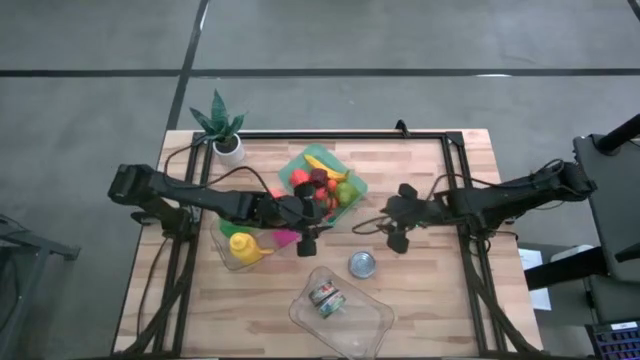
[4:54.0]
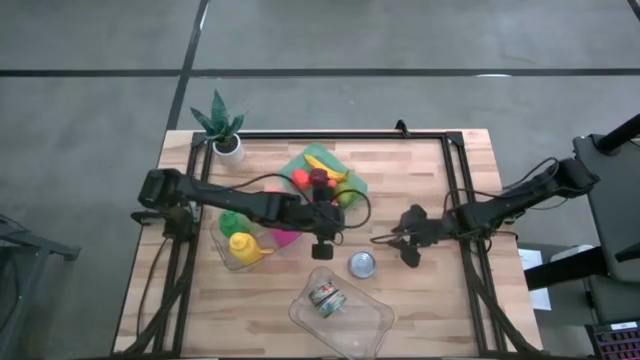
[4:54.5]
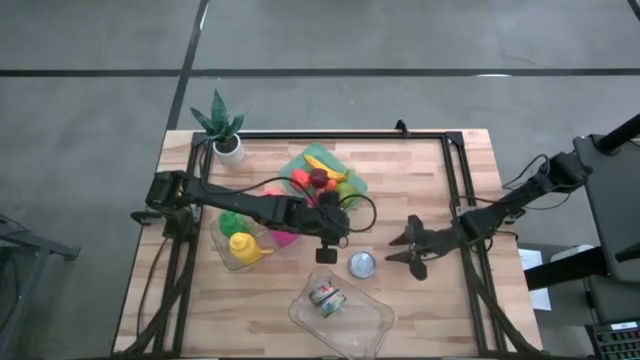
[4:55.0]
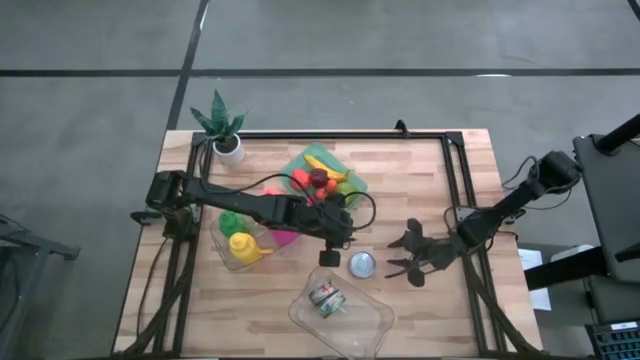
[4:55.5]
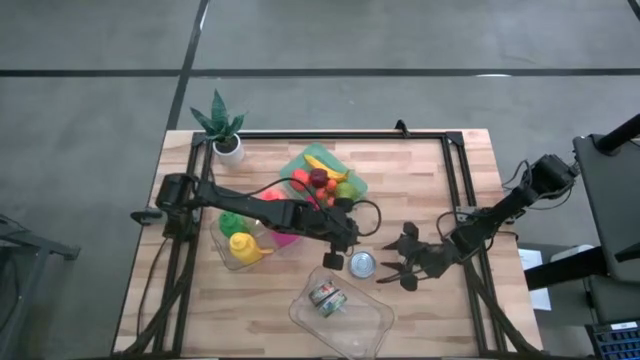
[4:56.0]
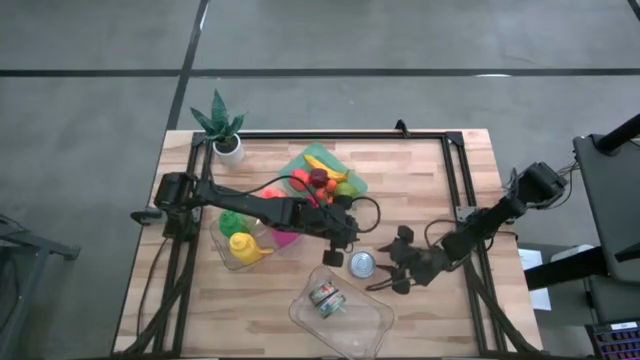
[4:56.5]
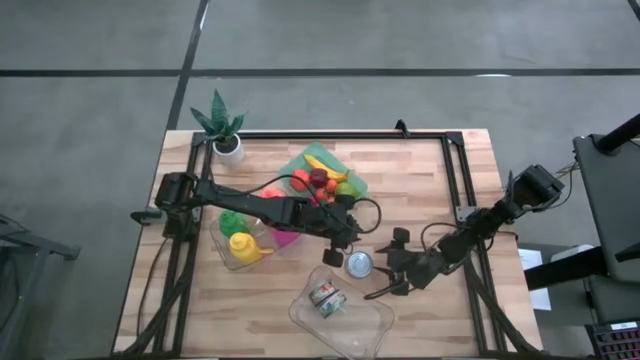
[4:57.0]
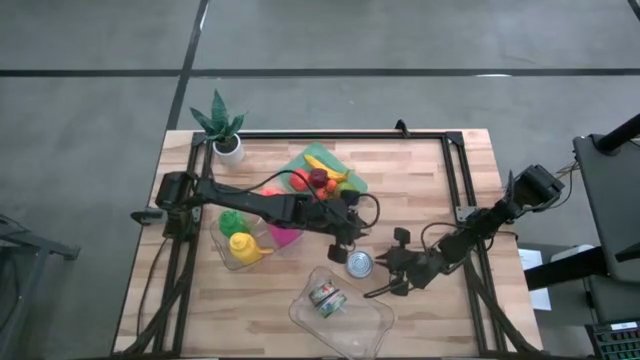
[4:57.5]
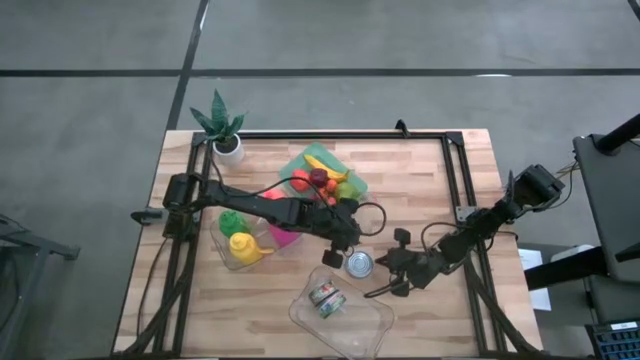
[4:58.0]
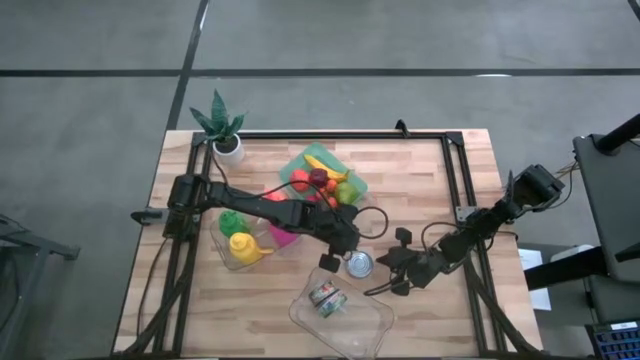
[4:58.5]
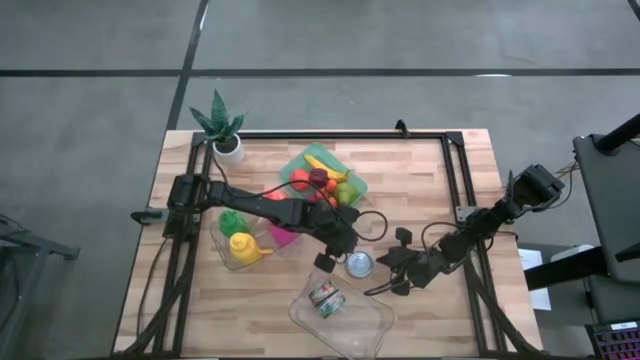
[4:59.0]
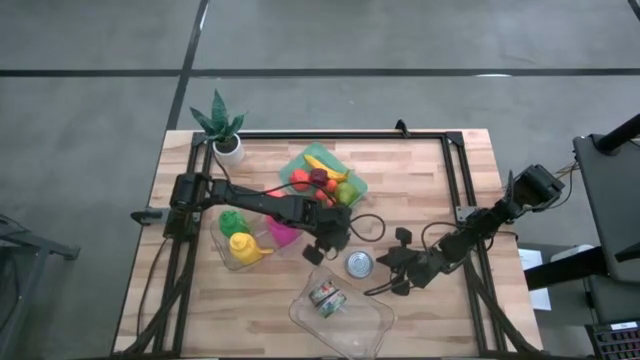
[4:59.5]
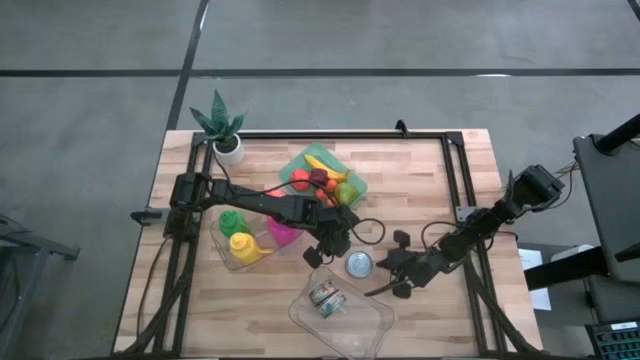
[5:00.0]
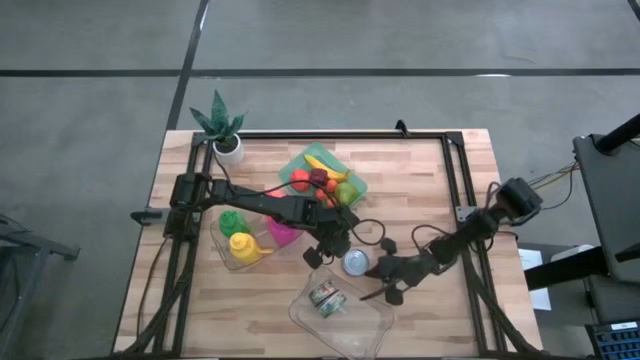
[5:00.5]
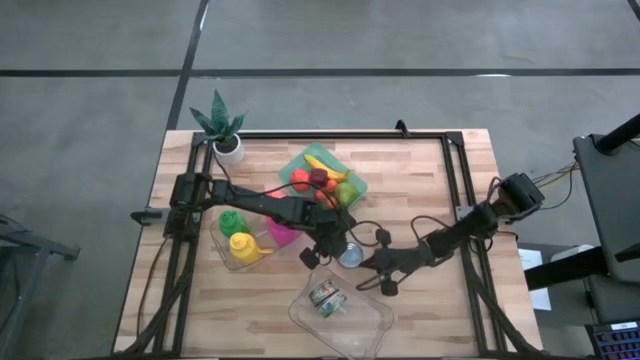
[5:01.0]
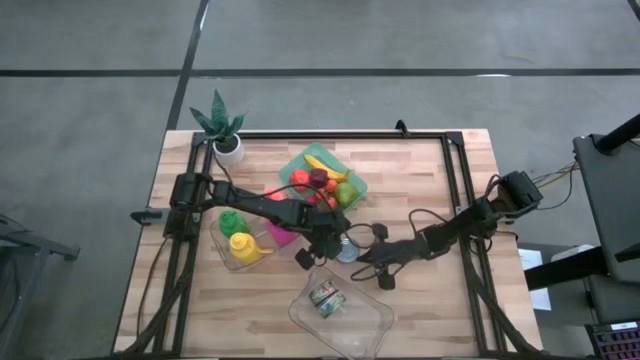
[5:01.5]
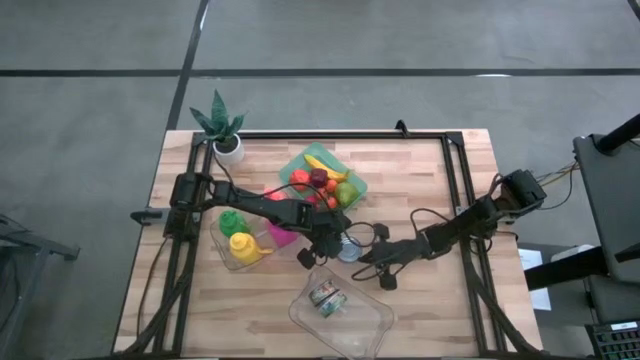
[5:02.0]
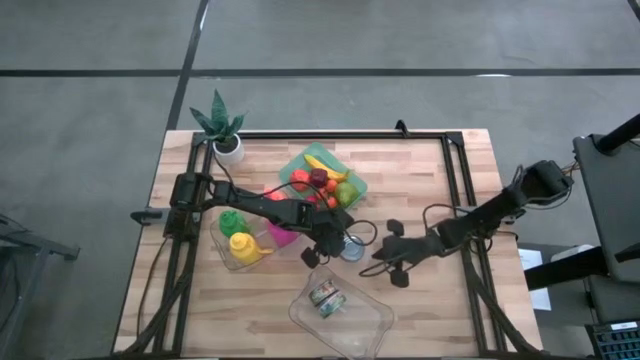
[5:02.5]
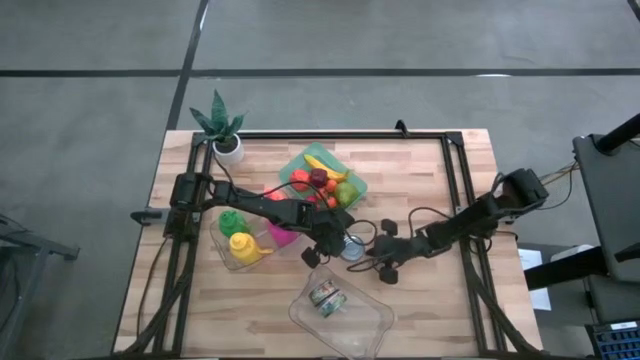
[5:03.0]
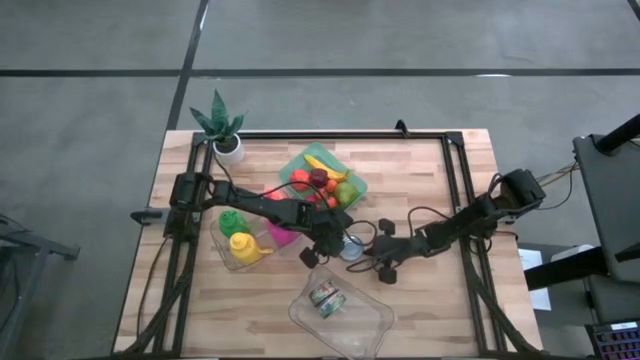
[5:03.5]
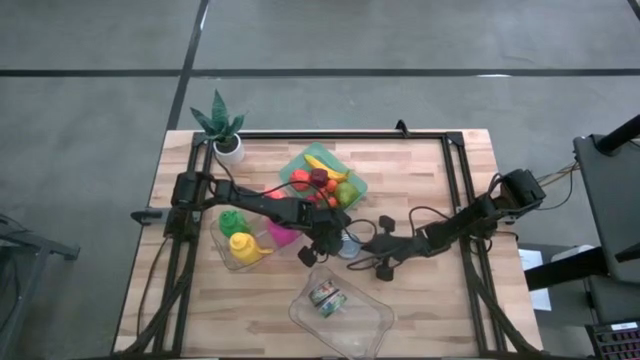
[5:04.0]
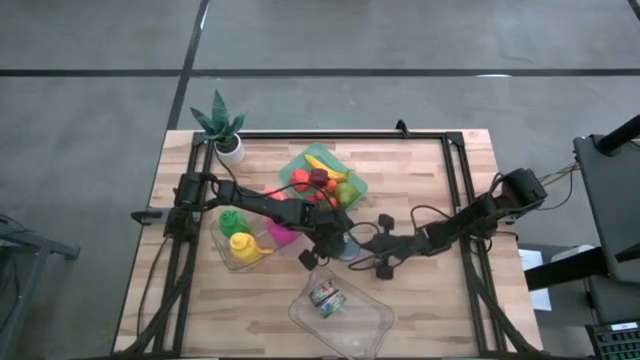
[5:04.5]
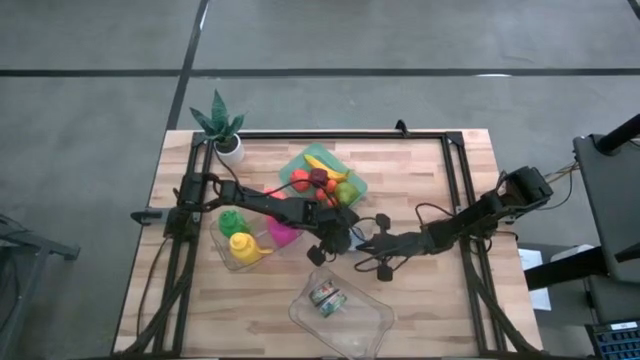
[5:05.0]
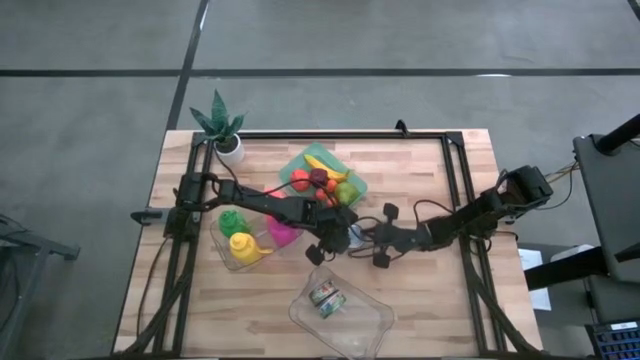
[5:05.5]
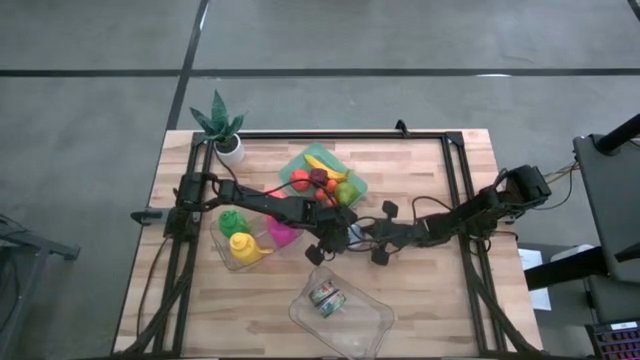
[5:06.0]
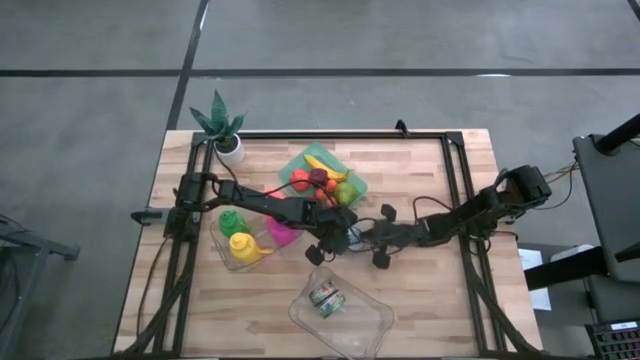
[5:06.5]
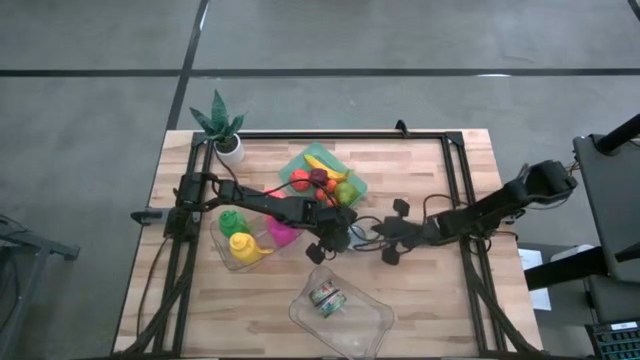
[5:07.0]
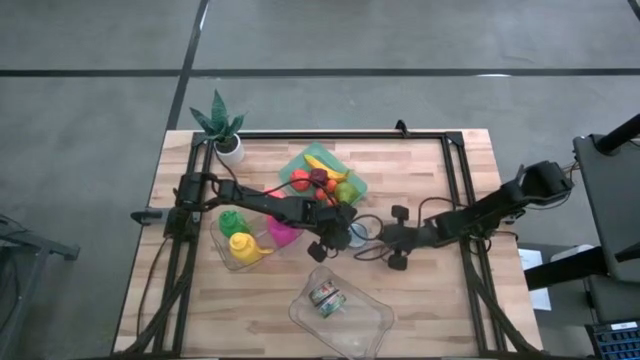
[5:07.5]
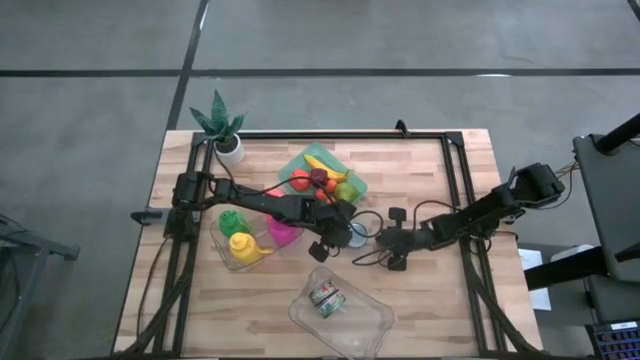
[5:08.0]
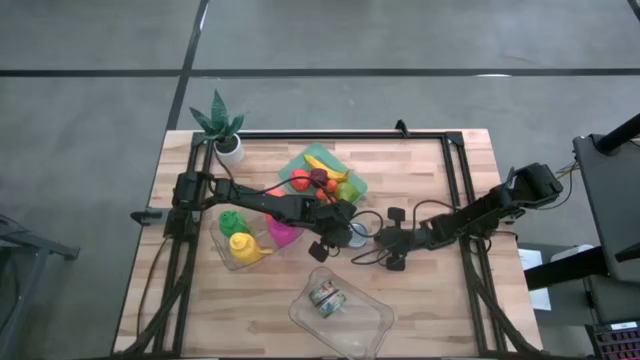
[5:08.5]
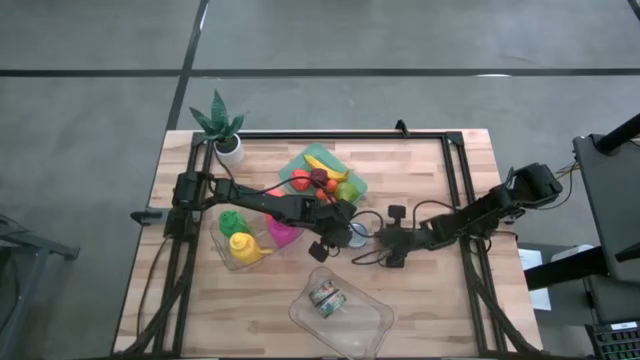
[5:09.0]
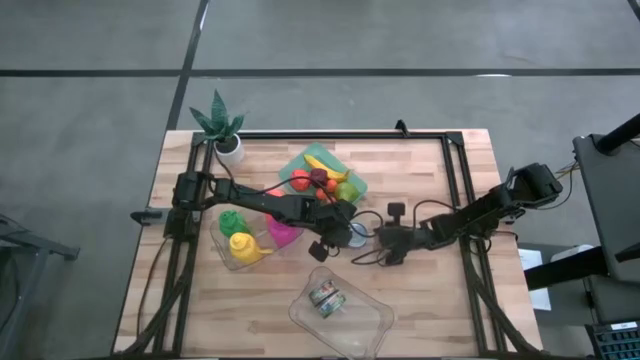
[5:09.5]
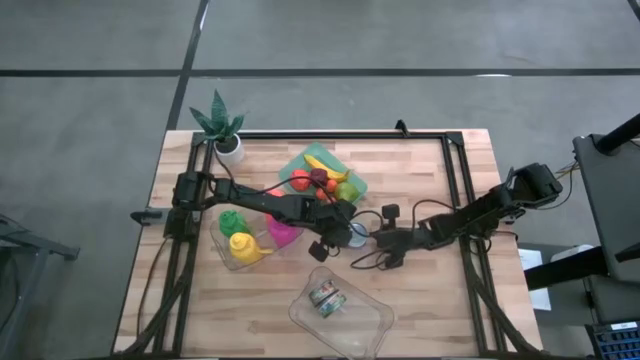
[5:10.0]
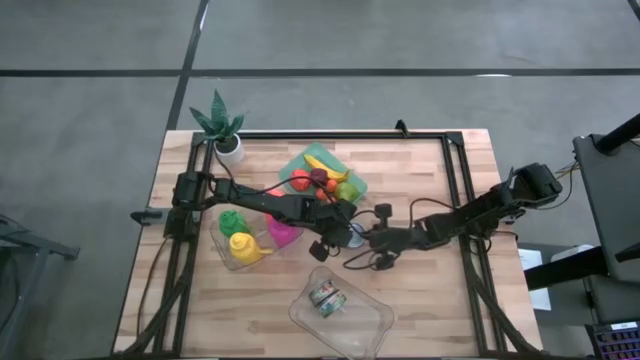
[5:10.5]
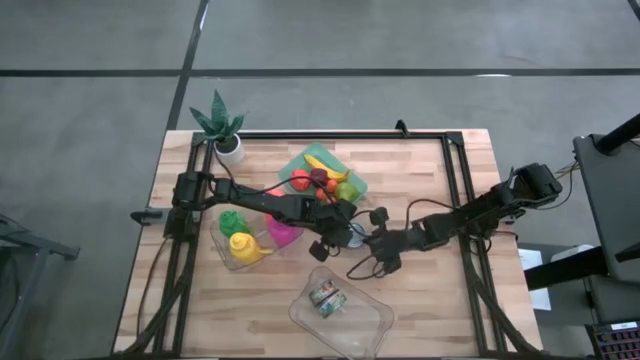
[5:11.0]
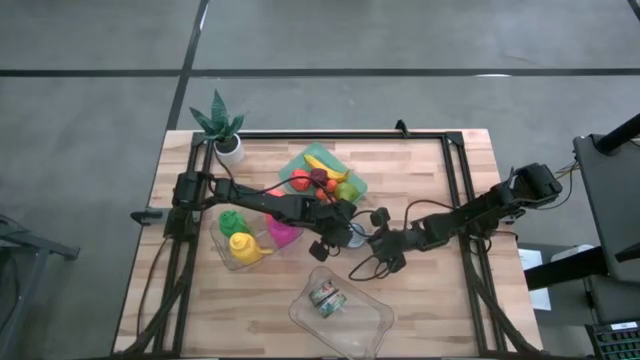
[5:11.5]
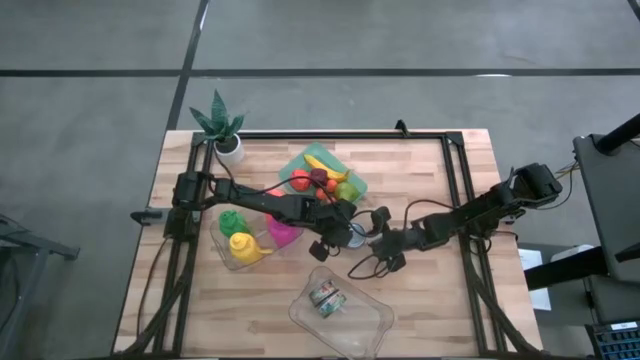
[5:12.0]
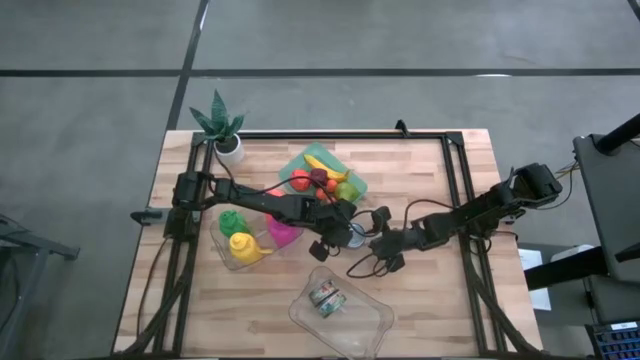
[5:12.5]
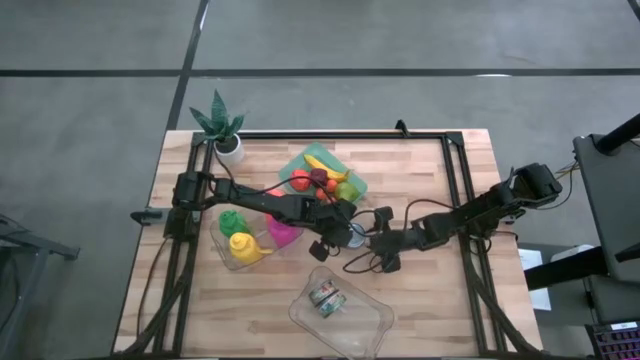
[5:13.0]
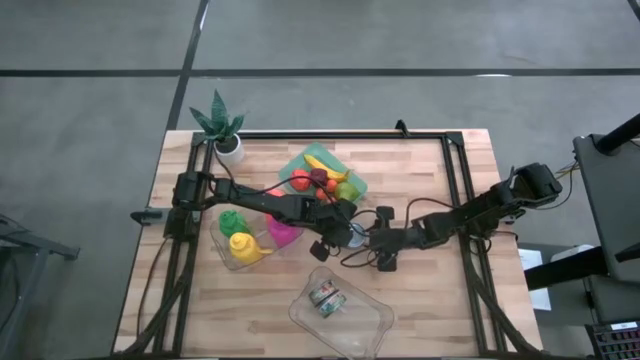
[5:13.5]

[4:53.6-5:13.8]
Task: Pick & Place Food Item
Put the red tuna can into the bottom transparent bin

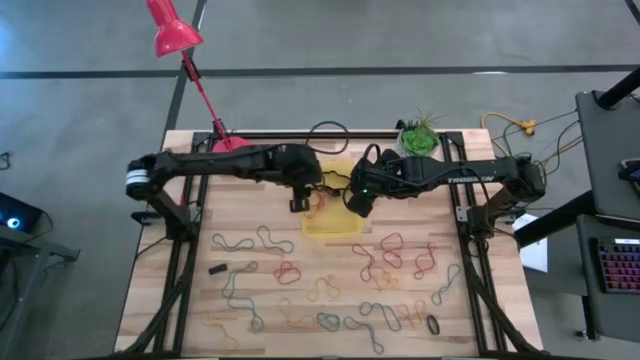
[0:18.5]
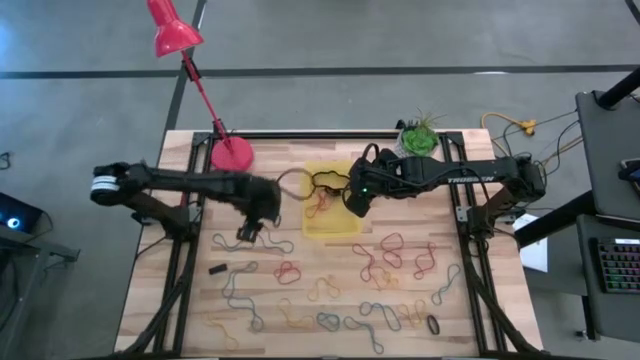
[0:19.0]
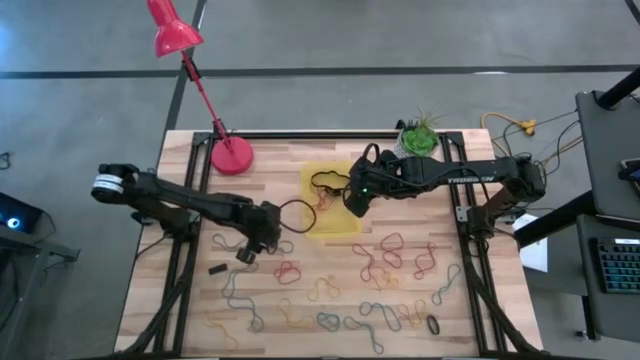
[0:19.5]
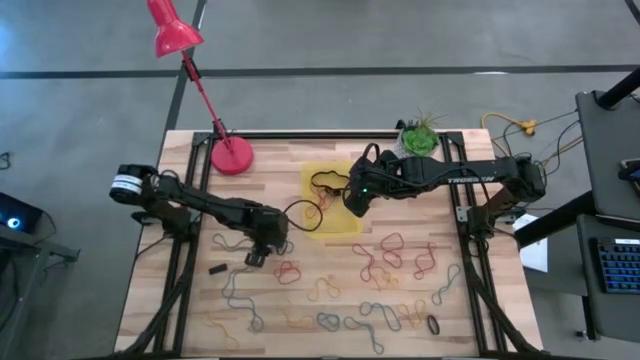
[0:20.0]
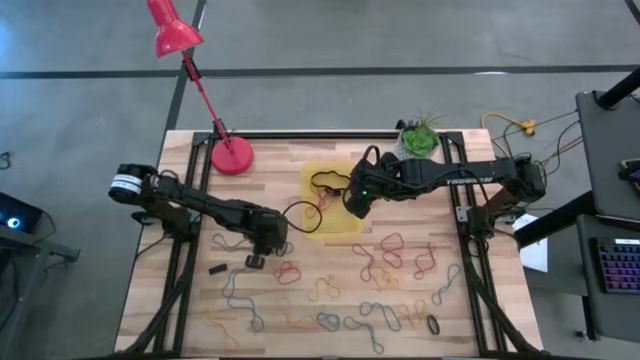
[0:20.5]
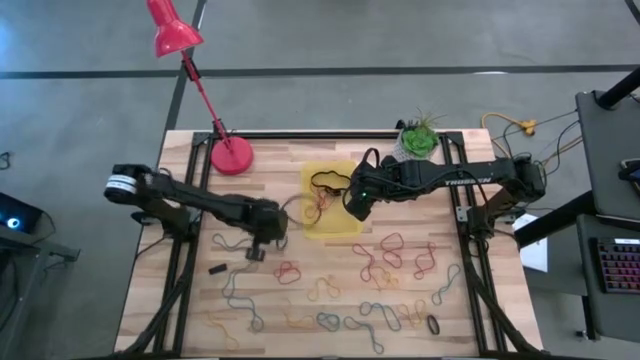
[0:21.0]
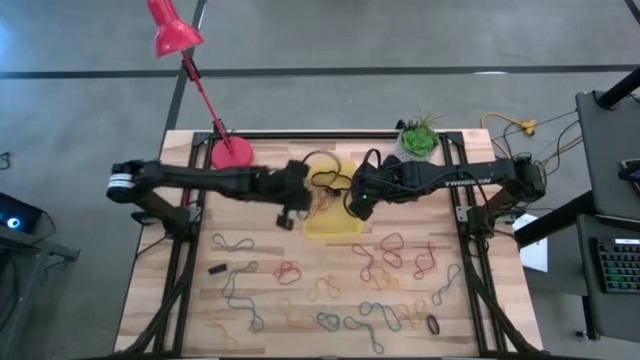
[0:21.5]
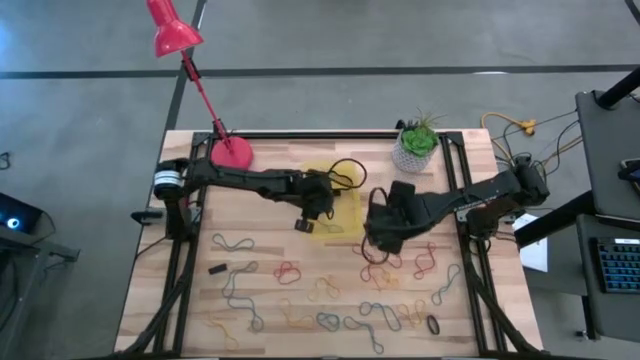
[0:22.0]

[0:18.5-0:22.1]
Task: Pick and place rubber bands into bin
Put the blue rubber band into the yellow bin
